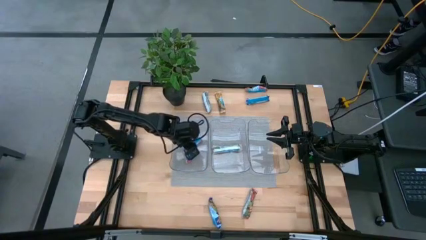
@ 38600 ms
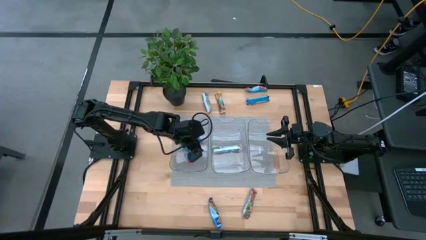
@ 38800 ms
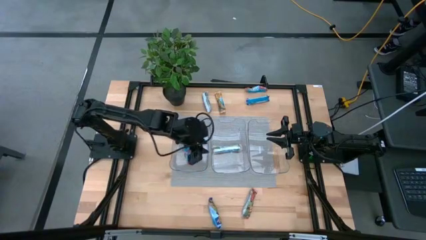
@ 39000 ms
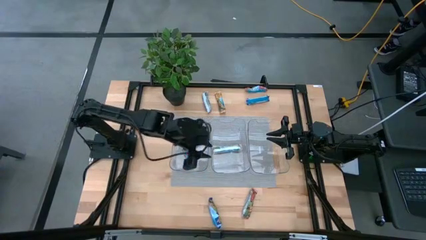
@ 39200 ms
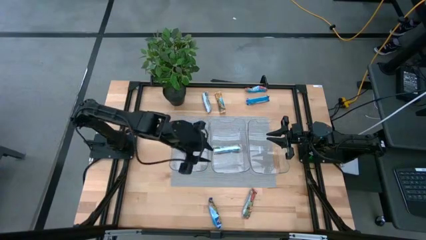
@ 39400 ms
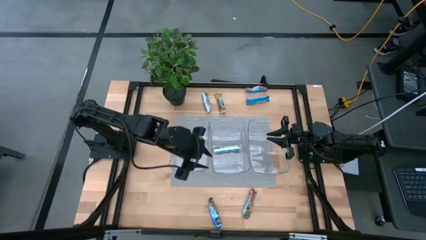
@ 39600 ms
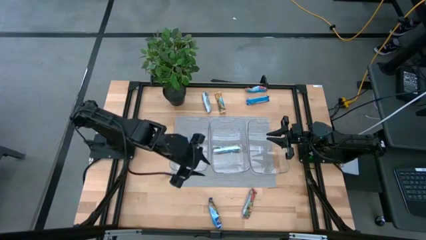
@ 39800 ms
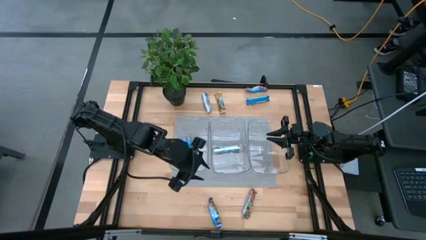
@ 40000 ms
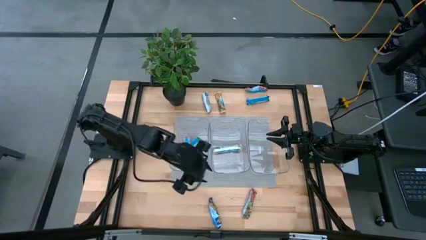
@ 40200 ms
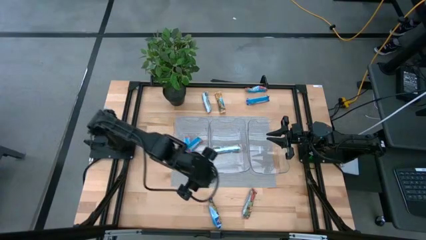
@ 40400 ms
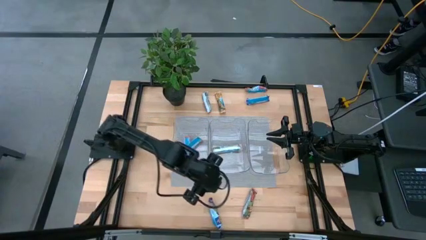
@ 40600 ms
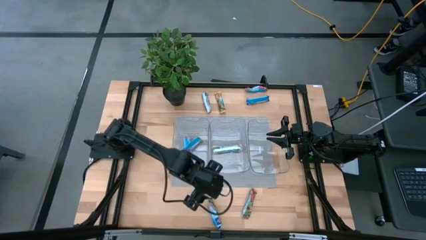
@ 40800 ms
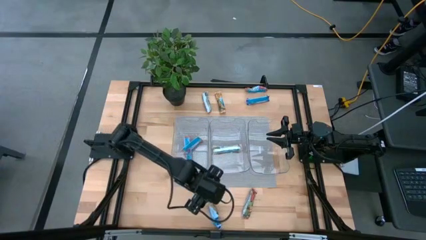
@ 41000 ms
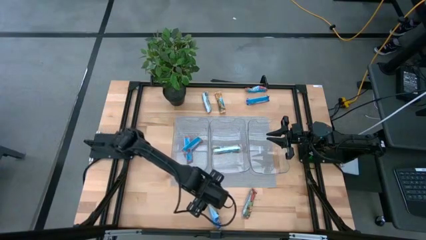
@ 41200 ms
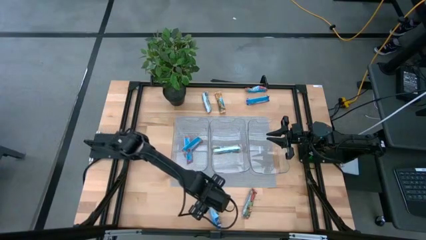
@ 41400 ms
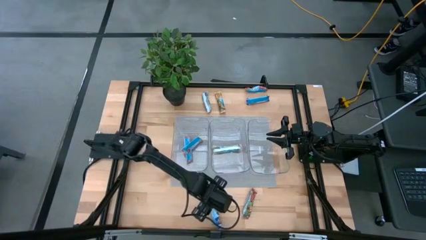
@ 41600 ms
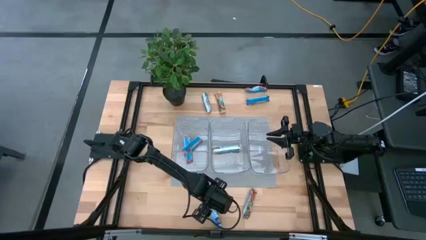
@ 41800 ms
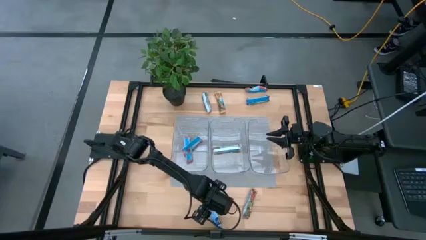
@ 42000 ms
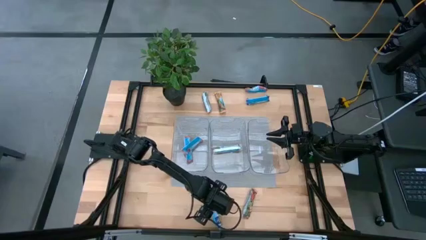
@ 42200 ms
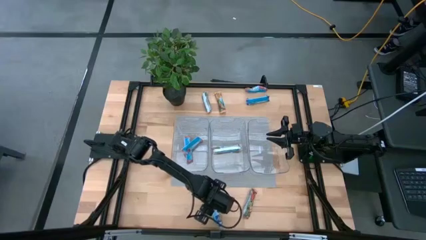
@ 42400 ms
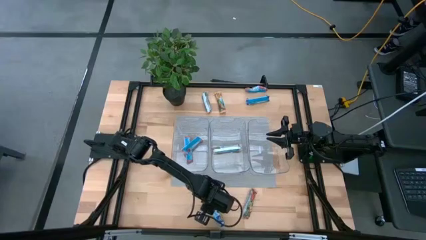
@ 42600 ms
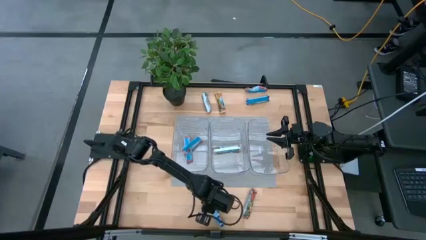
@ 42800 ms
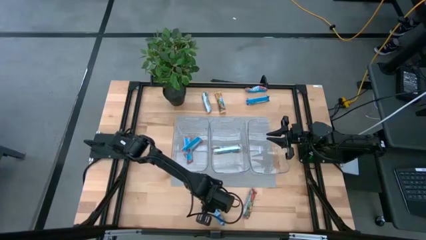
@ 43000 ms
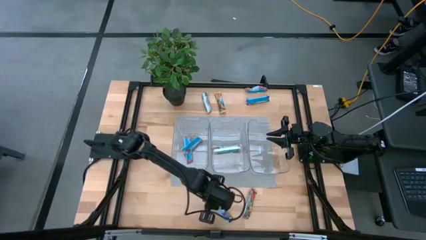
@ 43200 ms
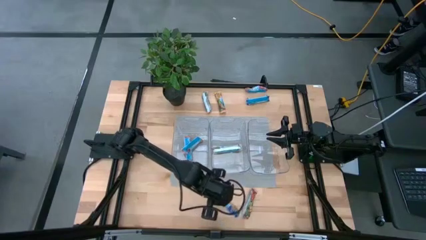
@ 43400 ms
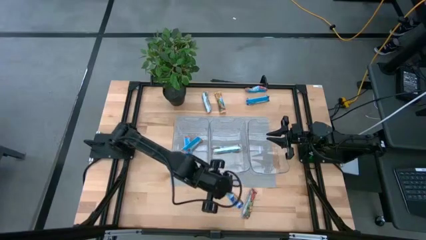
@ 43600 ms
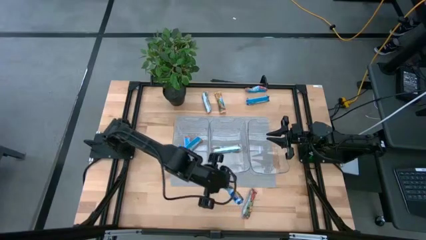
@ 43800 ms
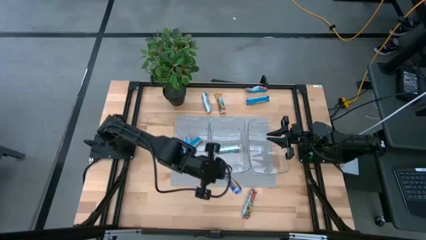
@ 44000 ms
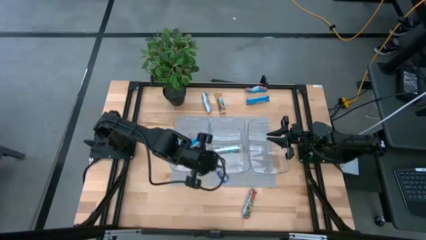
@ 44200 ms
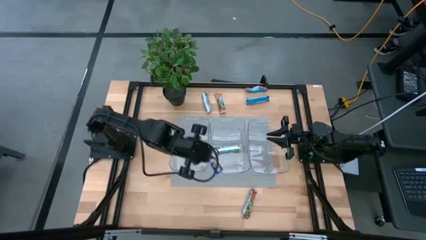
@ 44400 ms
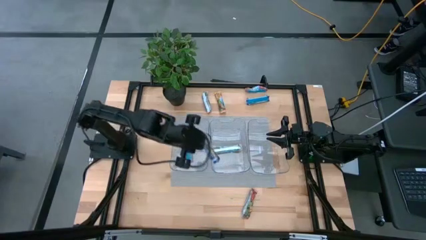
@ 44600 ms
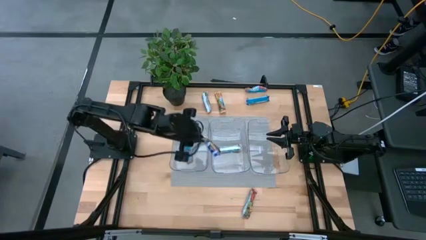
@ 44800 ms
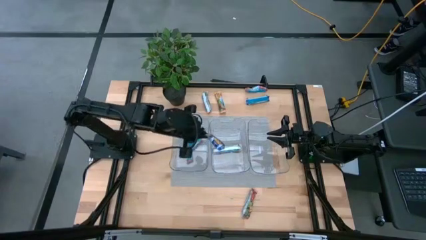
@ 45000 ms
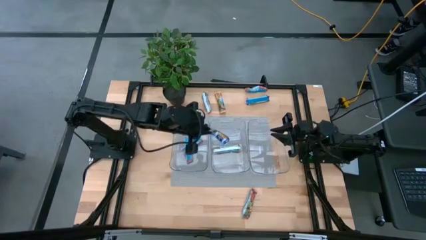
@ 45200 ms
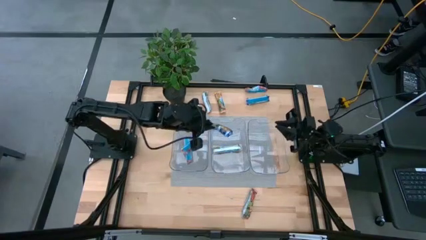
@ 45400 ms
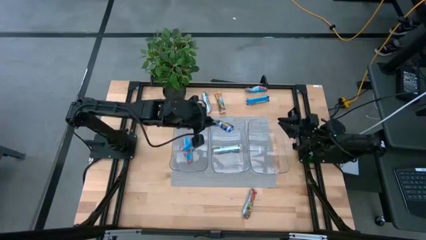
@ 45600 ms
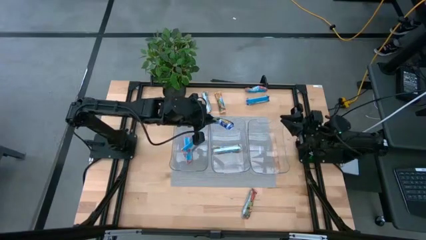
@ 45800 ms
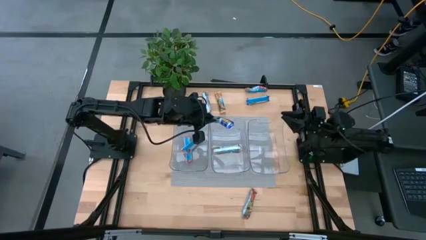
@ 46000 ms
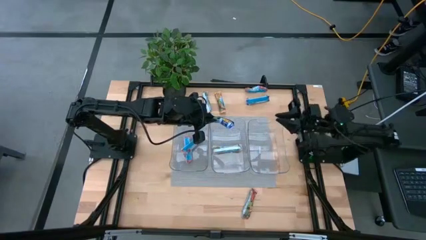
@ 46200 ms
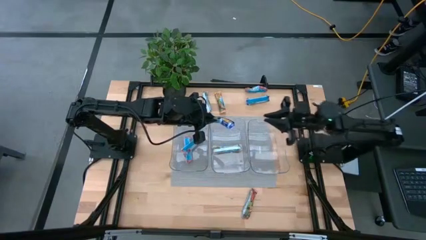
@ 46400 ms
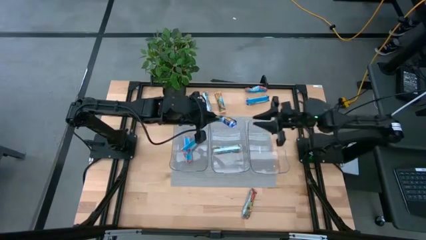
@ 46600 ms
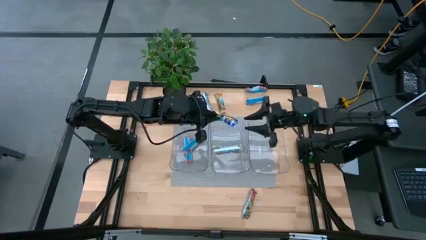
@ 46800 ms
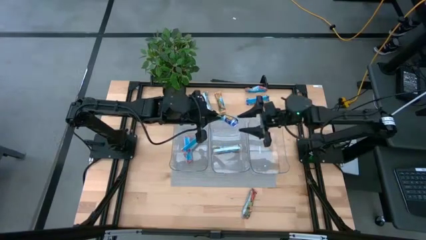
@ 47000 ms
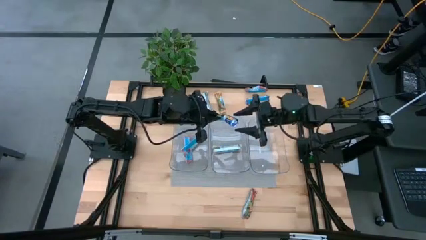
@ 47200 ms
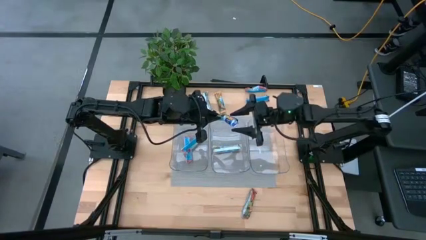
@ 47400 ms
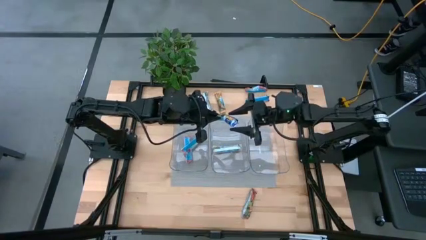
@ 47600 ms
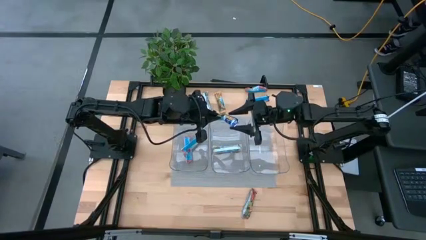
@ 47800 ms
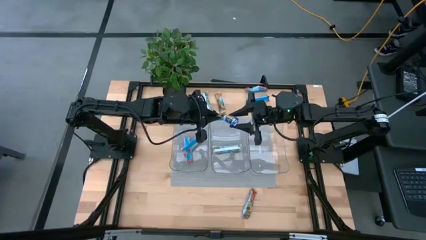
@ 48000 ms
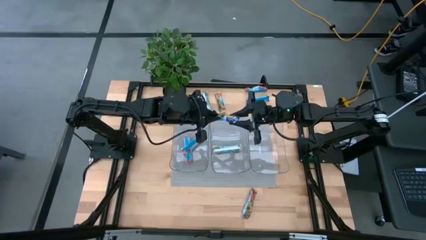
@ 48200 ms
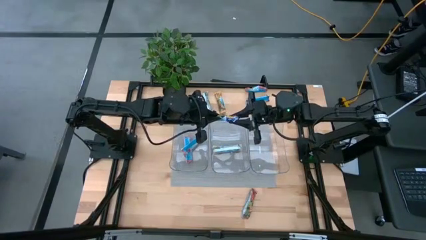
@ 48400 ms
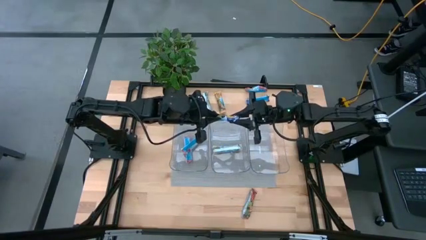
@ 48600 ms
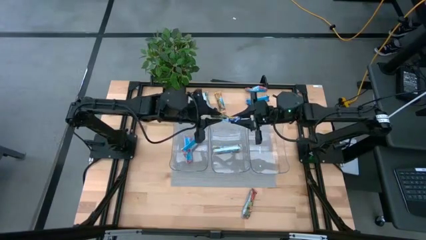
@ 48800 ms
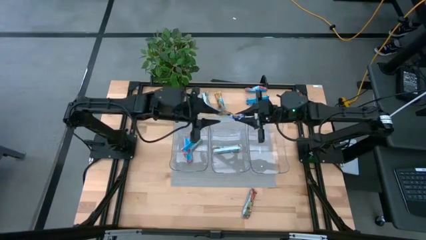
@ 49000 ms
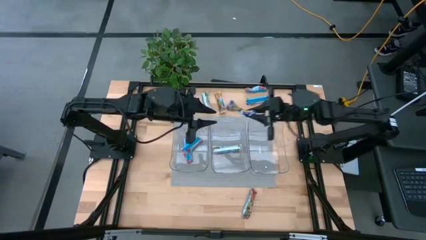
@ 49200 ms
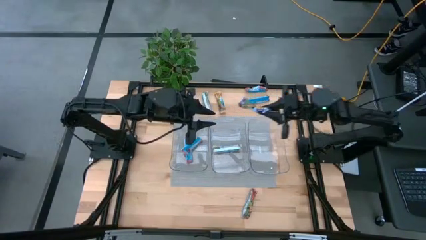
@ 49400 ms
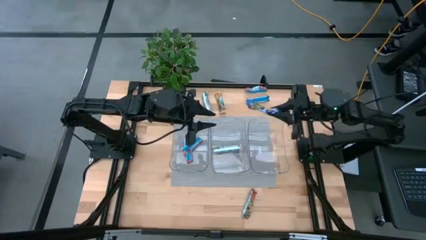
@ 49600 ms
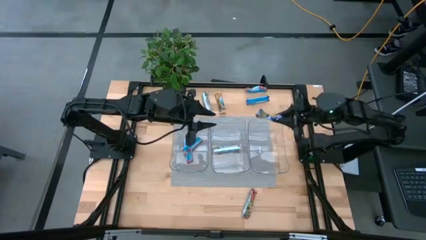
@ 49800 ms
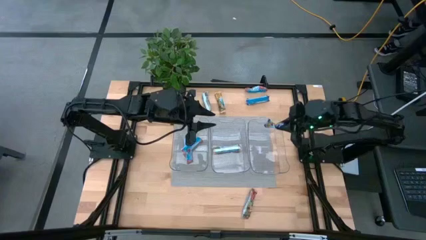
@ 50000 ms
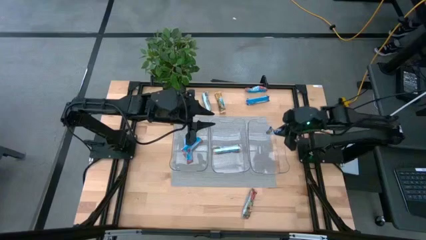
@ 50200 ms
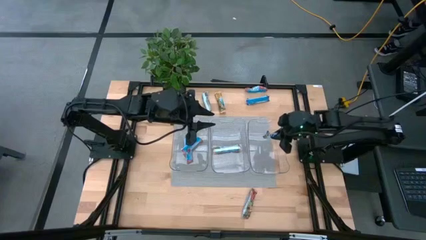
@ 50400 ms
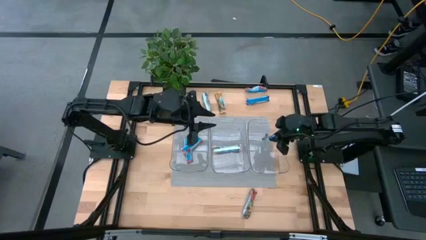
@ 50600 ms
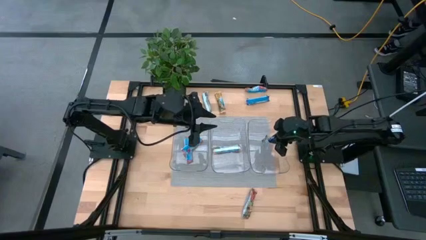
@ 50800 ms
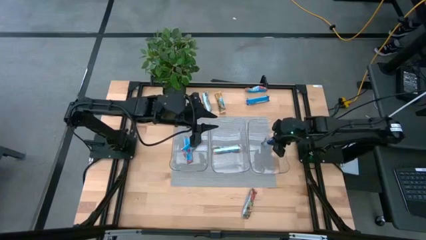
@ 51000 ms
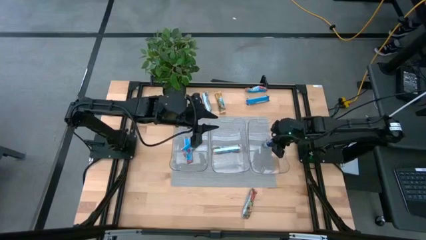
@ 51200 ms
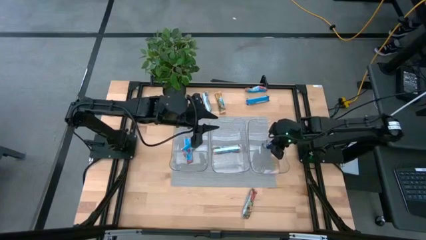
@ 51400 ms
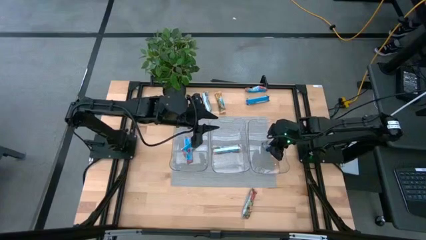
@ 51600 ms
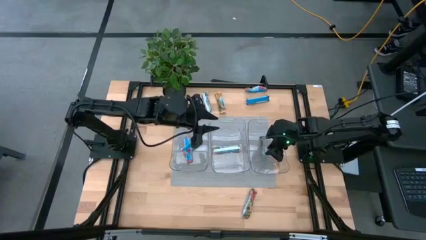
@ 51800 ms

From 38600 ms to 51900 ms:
Task: Pick and place Granola Bars by type
Put the blue granola bar into the right transparent bin

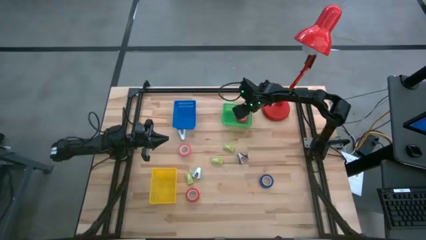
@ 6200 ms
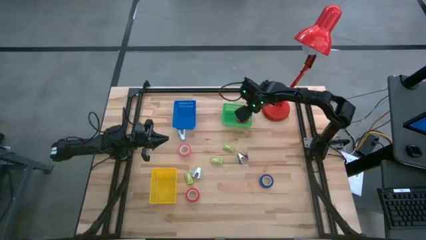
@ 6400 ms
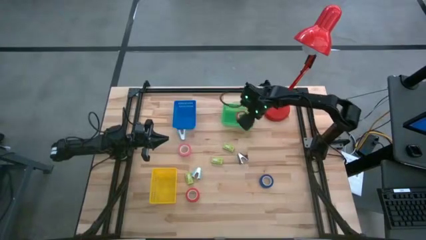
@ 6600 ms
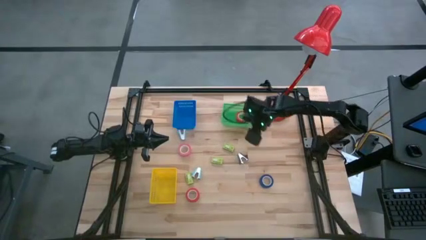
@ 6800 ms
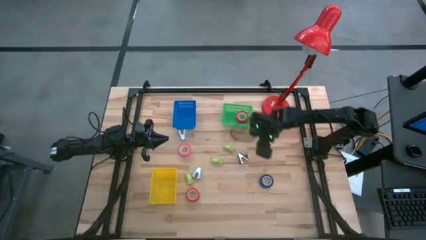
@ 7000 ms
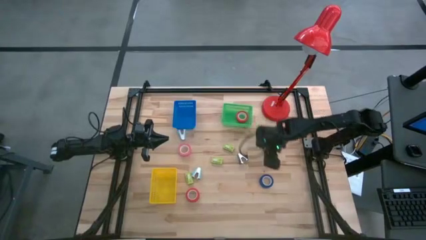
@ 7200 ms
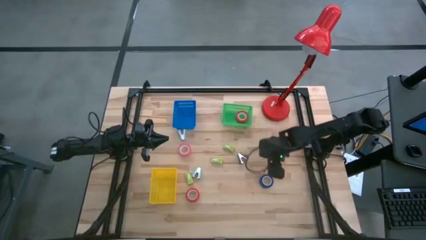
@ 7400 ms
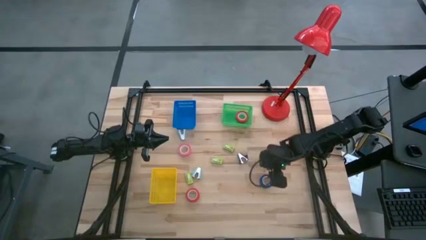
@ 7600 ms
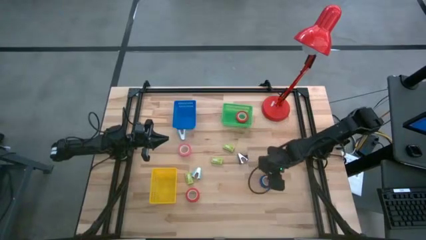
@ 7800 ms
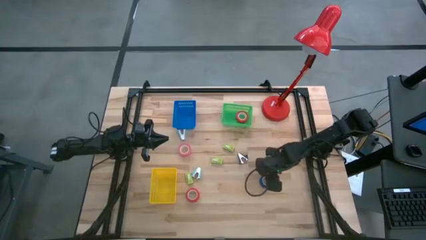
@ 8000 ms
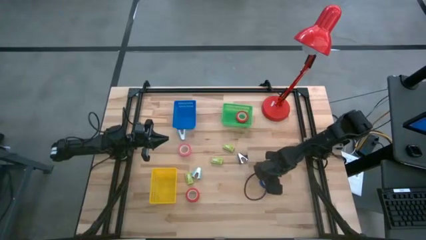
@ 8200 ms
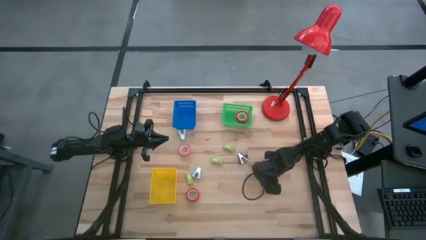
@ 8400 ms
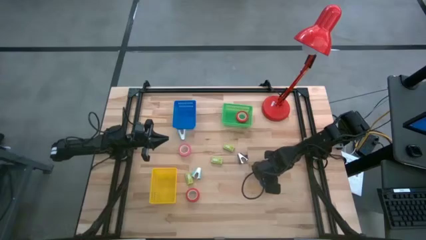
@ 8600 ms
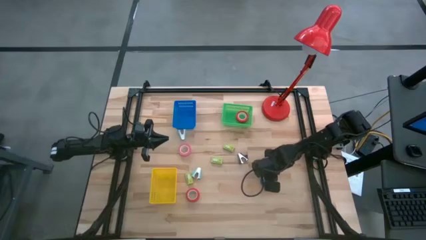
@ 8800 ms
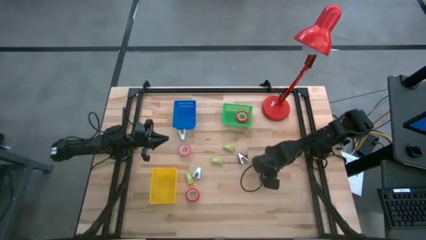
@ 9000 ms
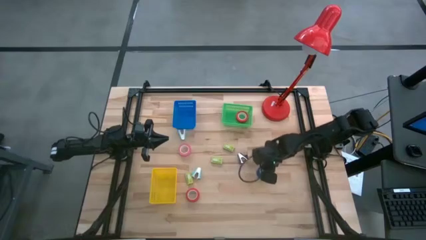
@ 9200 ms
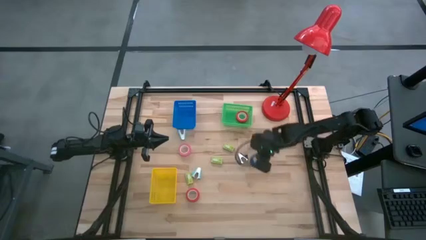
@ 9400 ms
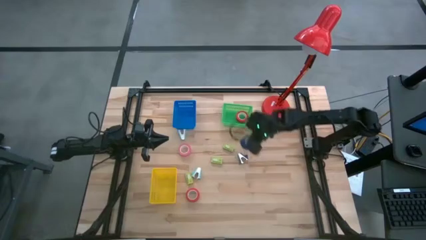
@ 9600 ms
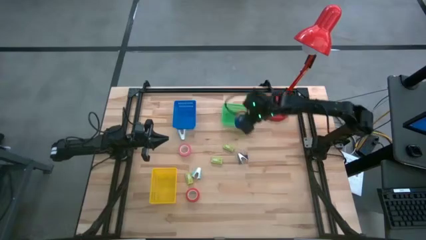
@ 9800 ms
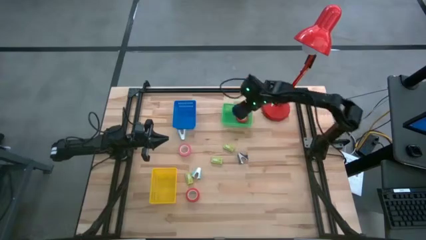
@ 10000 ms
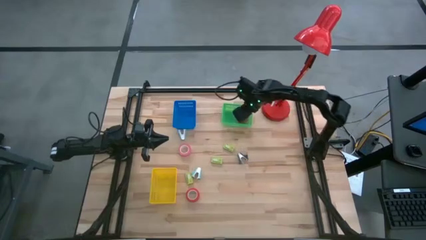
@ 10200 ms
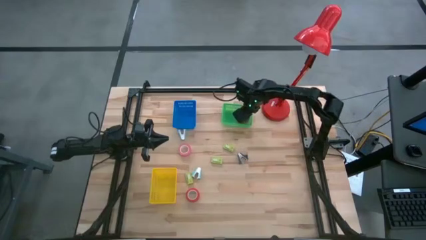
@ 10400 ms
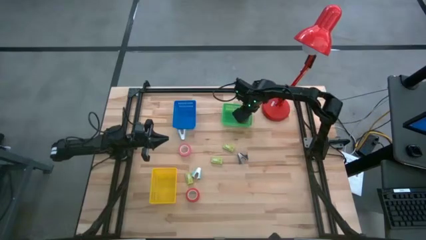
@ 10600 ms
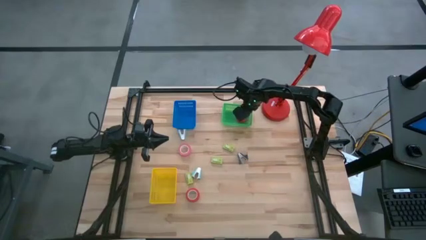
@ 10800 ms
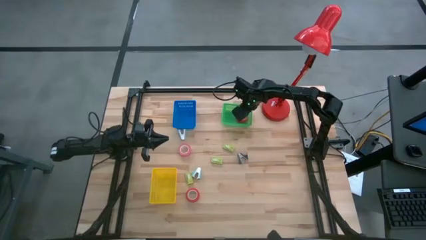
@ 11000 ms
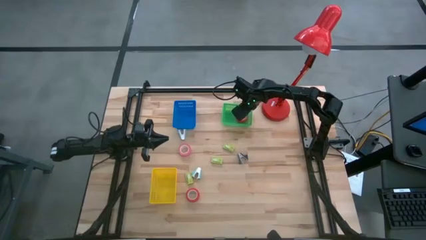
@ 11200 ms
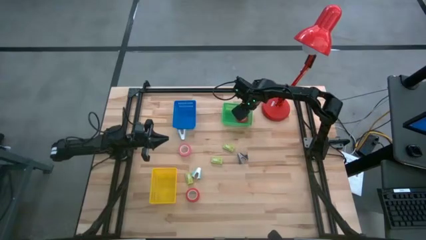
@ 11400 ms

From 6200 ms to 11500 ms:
Task: Pick and place Stapler, Stapler remover, tape
Put the blue tape into the green basket
